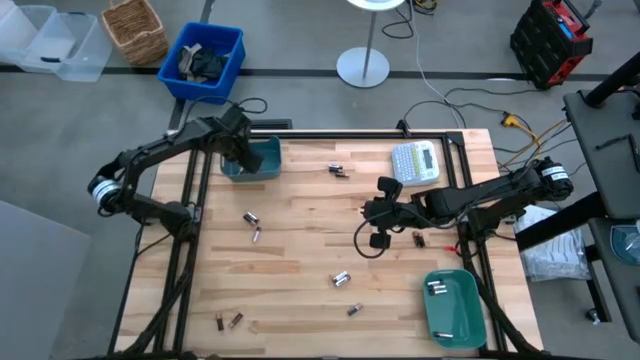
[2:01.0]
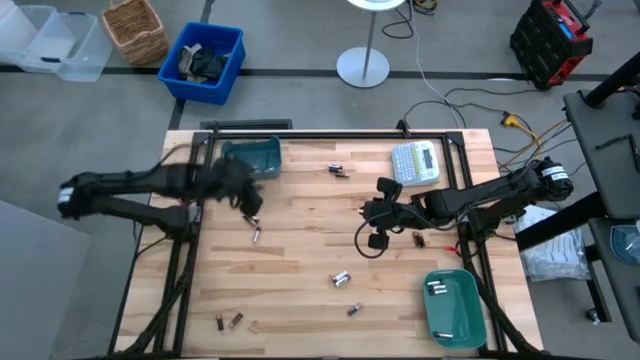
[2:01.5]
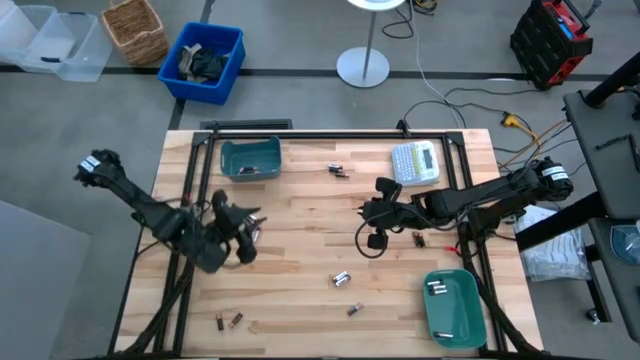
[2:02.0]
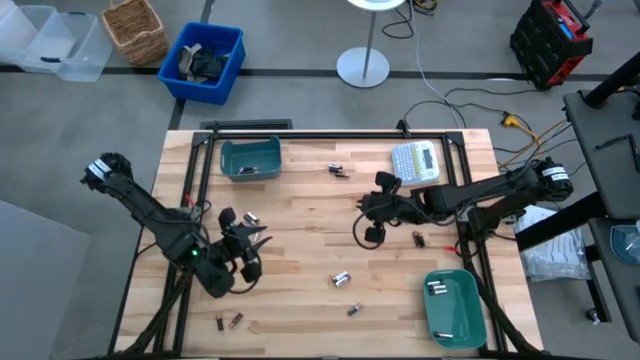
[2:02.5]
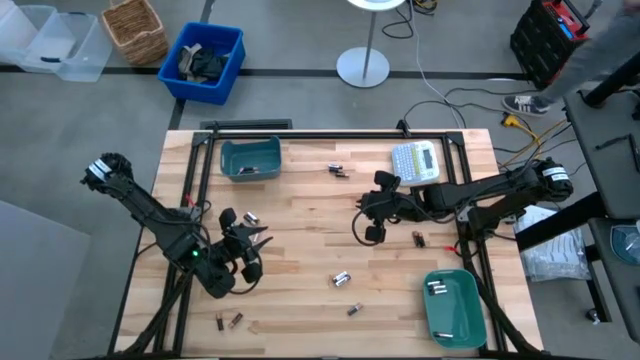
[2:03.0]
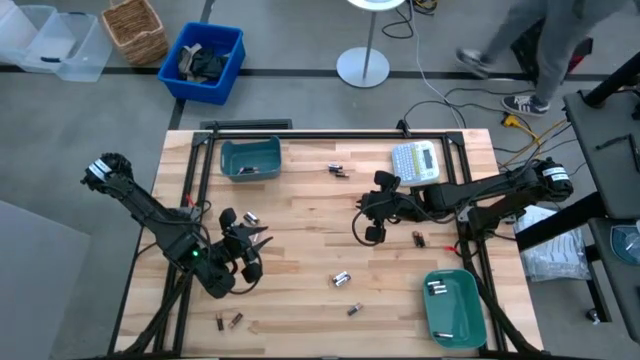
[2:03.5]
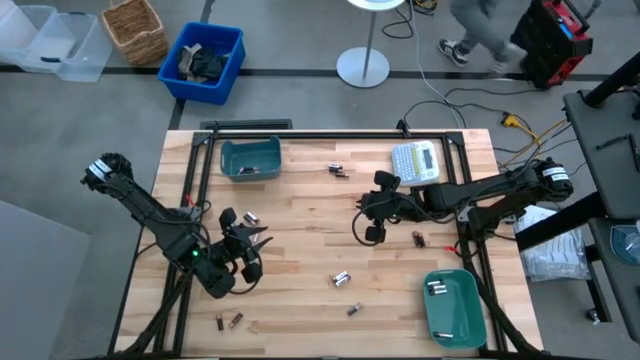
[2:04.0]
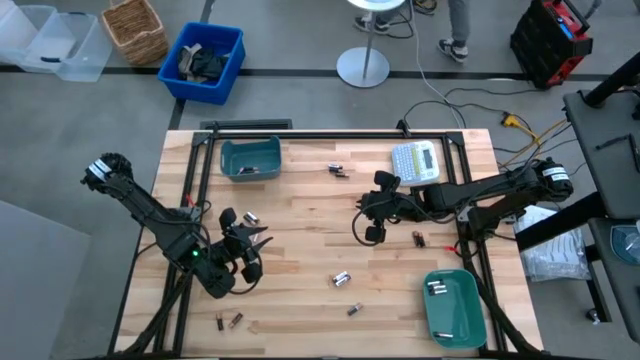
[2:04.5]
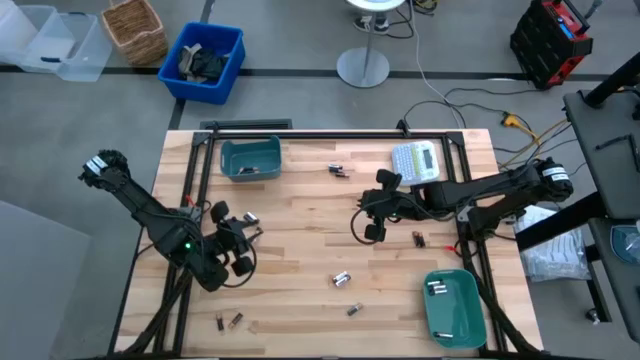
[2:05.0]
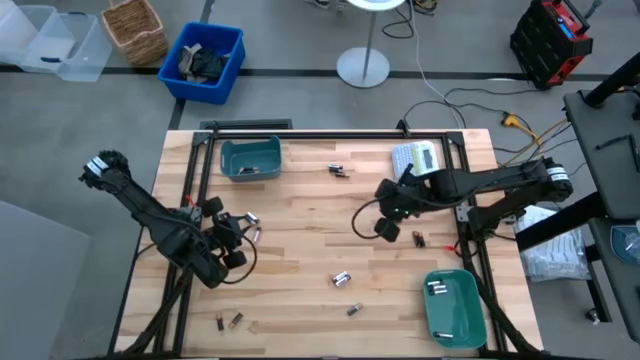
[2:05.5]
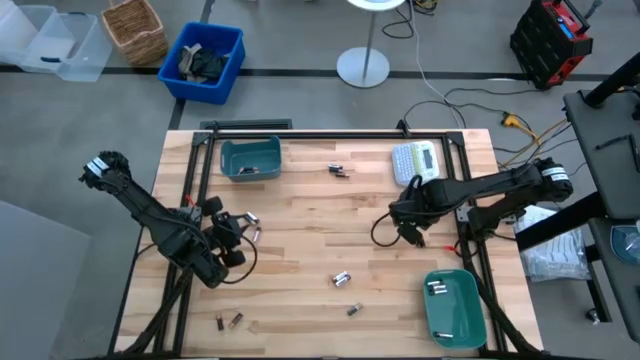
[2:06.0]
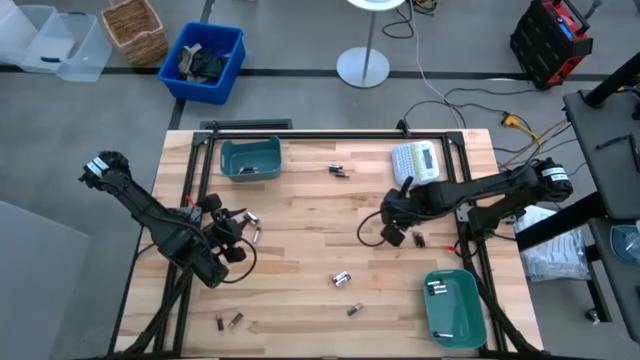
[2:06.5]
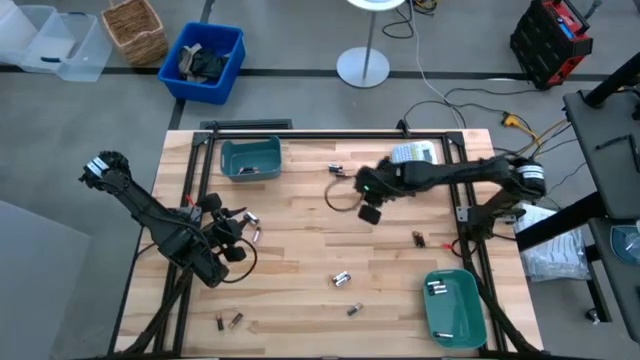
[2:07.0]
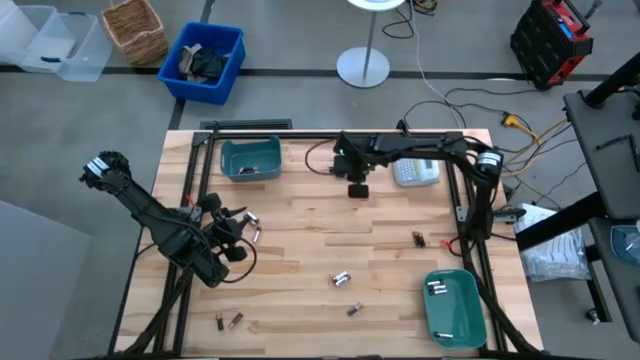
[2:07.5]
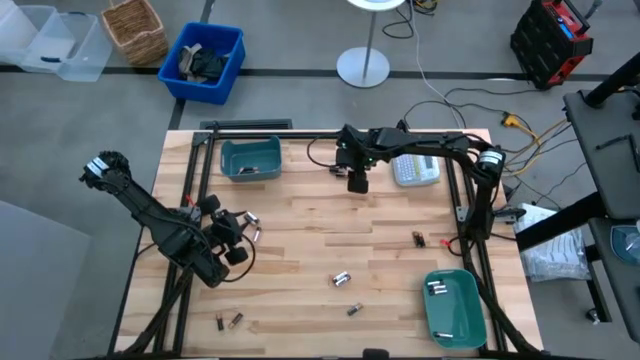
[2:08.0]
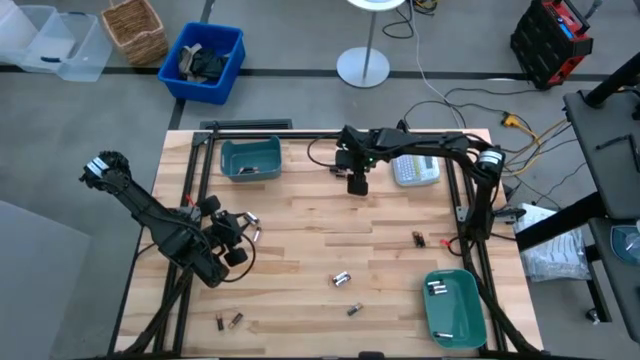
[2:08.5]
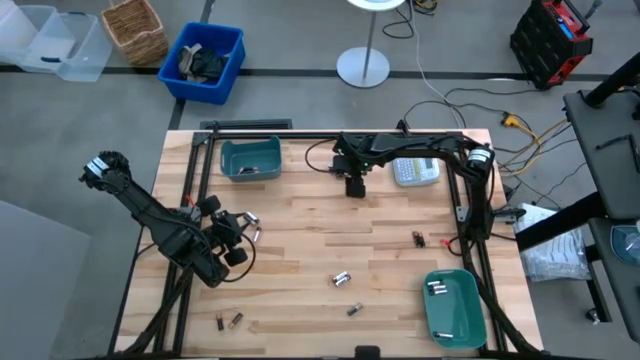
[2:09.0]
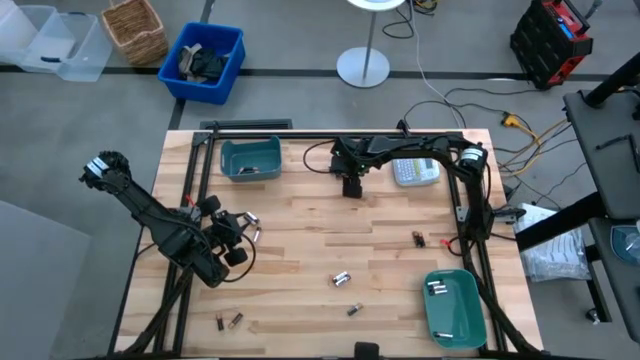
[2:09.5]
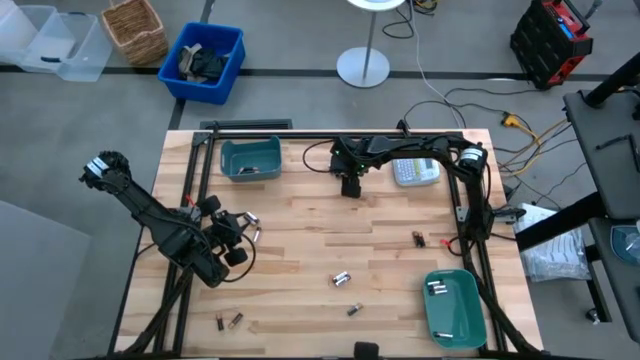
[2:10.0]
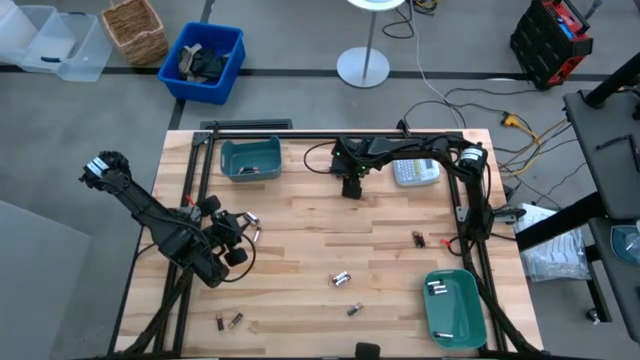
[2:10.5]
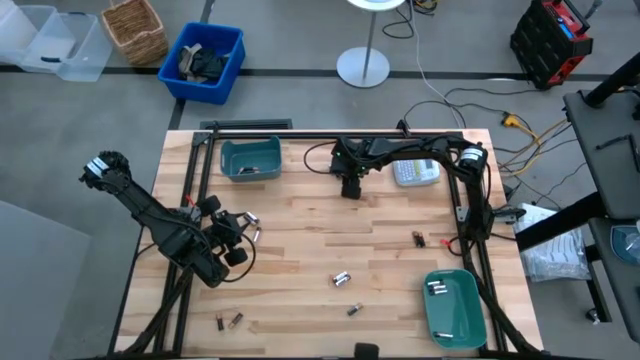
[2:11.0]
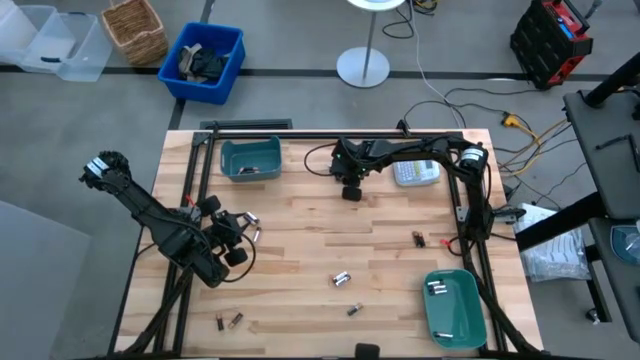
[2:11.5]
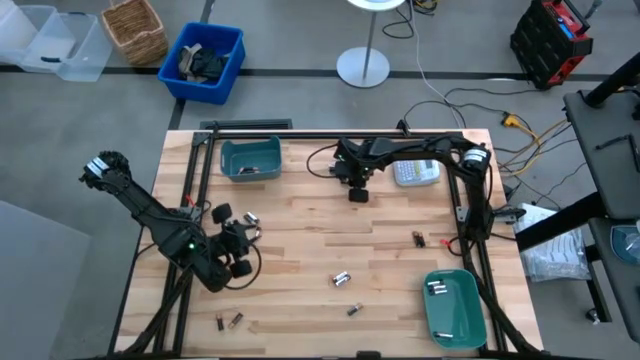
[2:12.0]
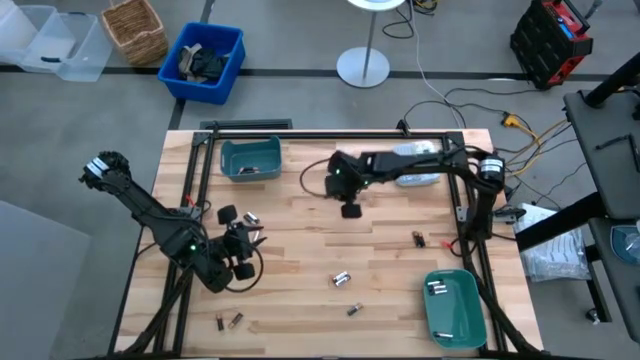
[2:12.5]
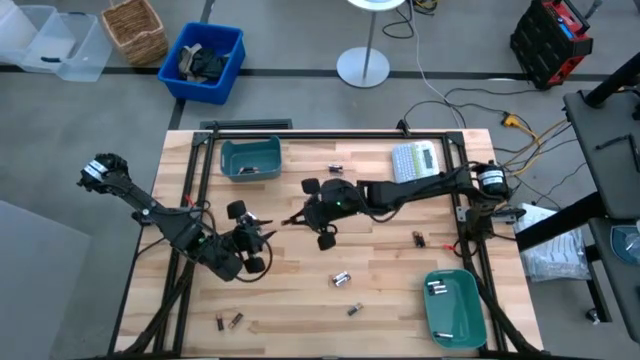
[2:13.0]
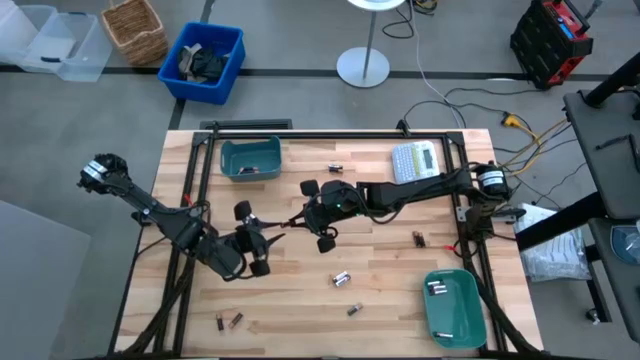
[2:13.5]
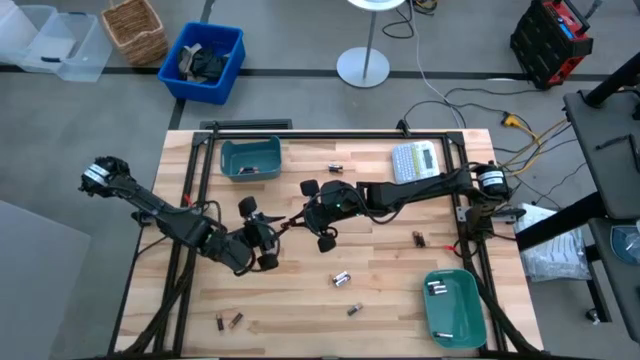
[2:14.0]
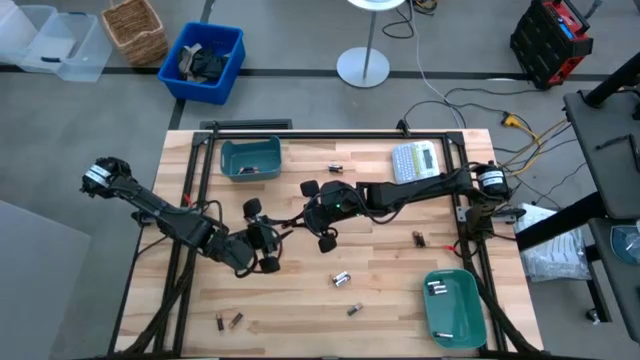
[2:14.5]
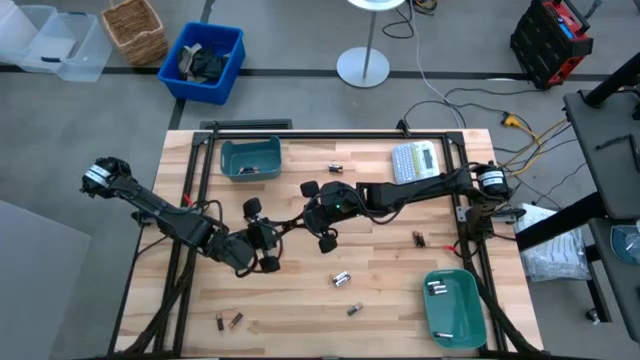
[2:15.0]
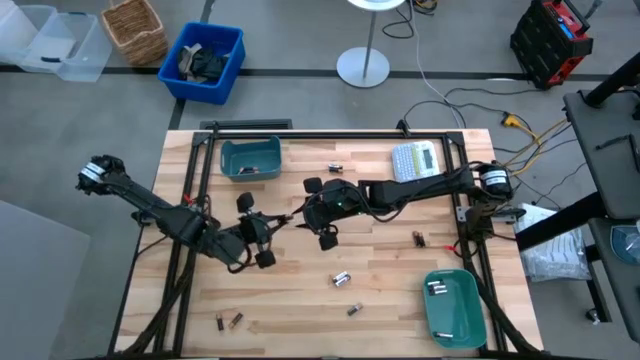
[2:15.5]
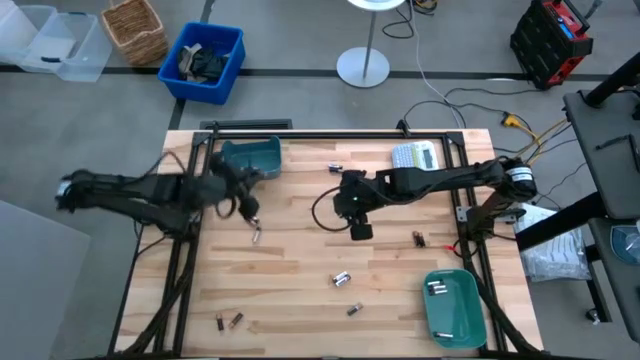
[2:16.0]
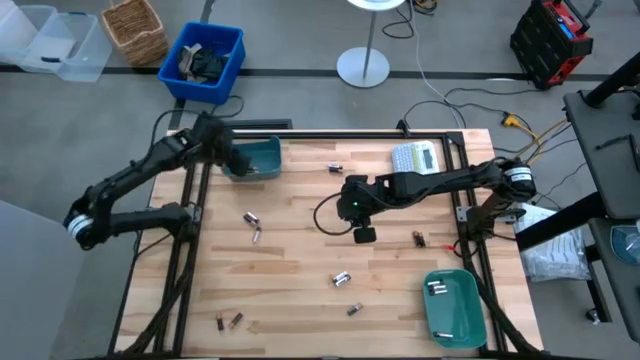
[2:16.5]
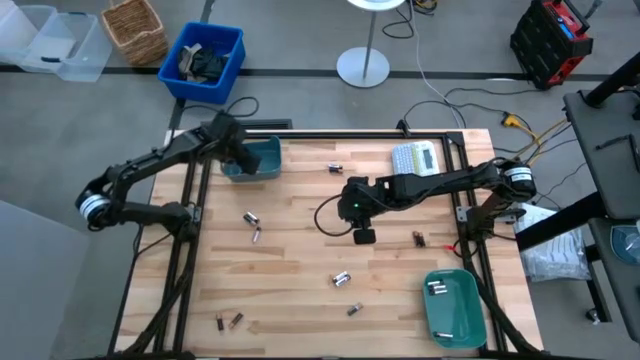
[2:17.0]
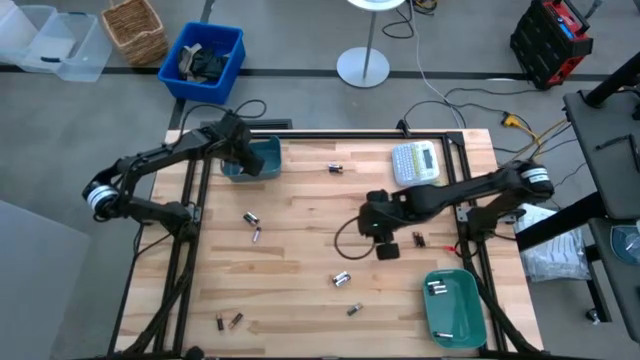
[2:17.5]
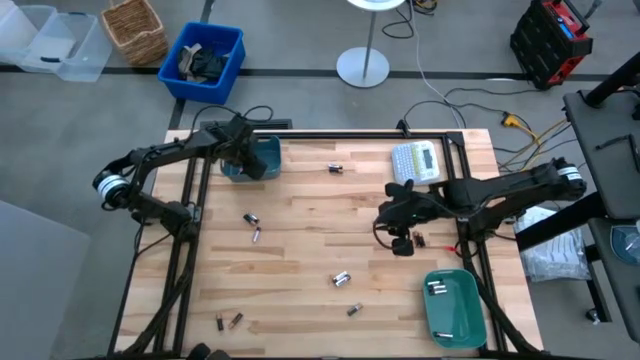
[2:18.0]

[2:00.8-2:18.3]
Task: Sort batteries
Put the black battery into the blue bin

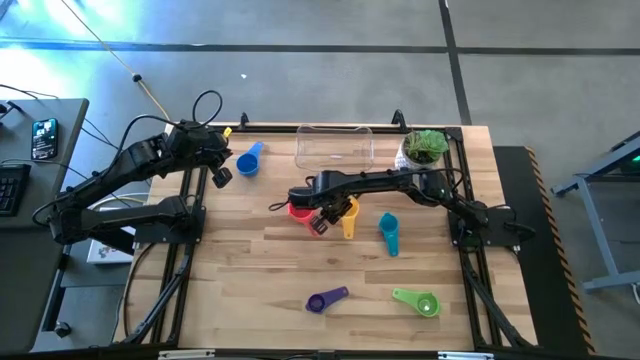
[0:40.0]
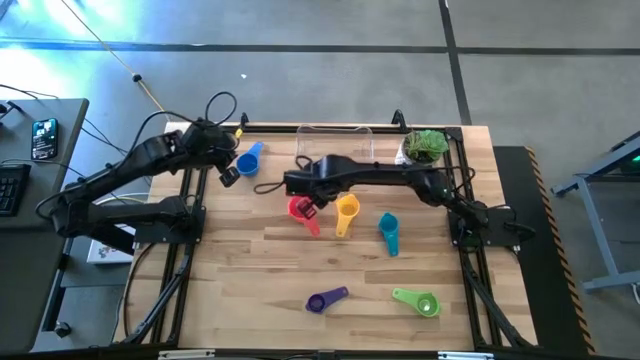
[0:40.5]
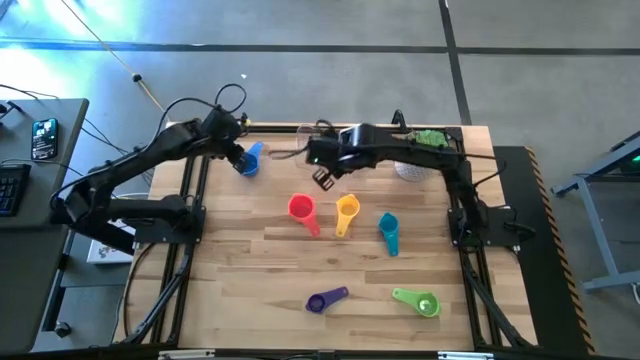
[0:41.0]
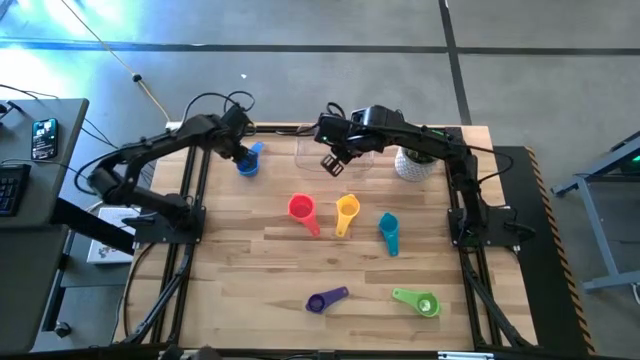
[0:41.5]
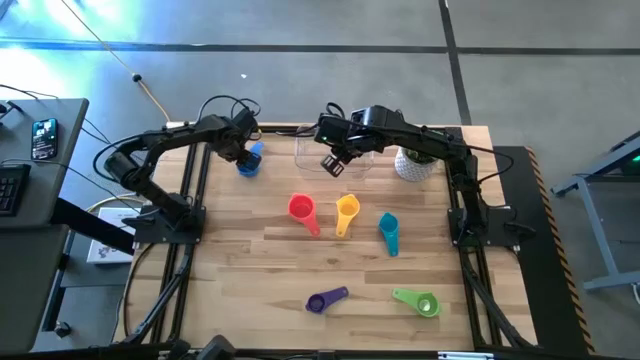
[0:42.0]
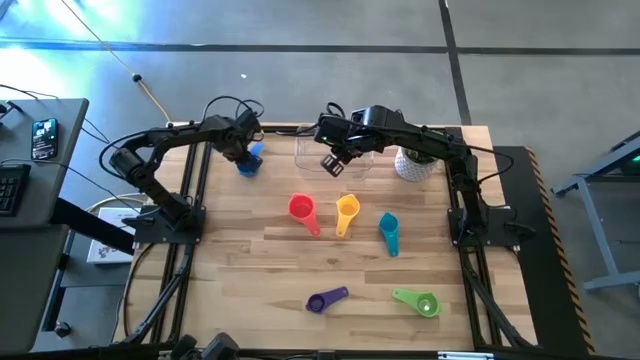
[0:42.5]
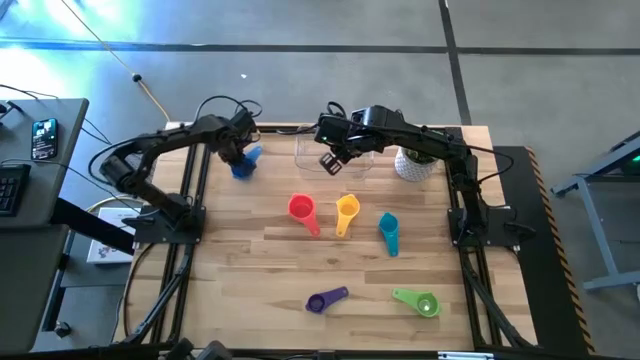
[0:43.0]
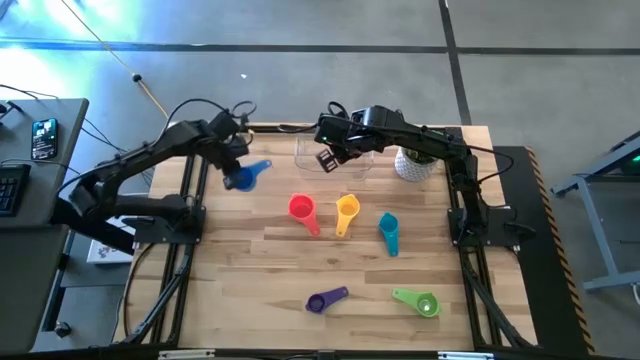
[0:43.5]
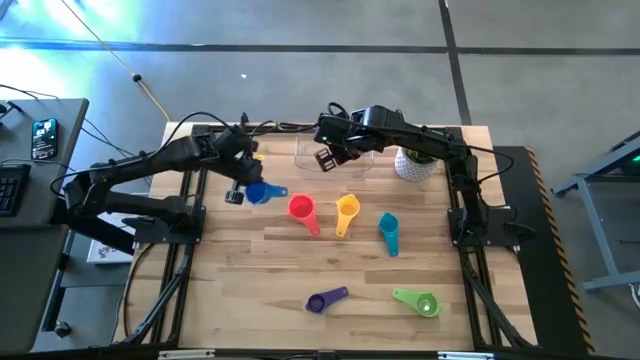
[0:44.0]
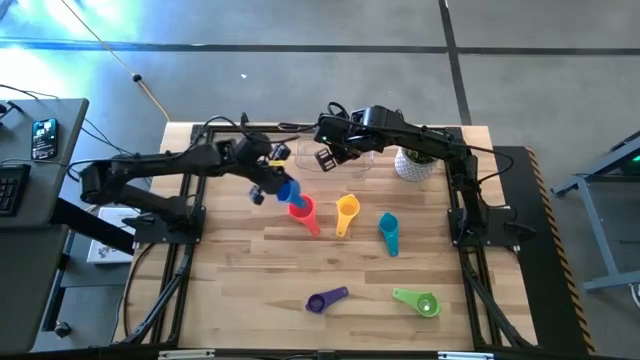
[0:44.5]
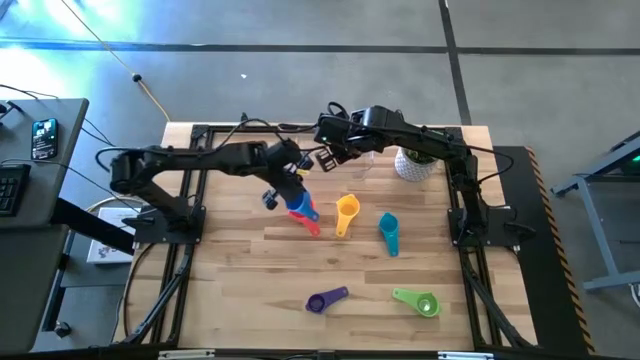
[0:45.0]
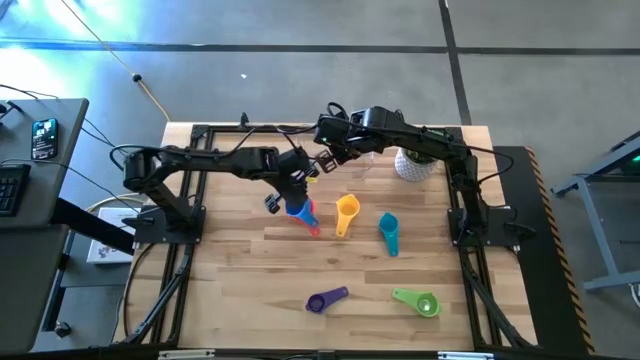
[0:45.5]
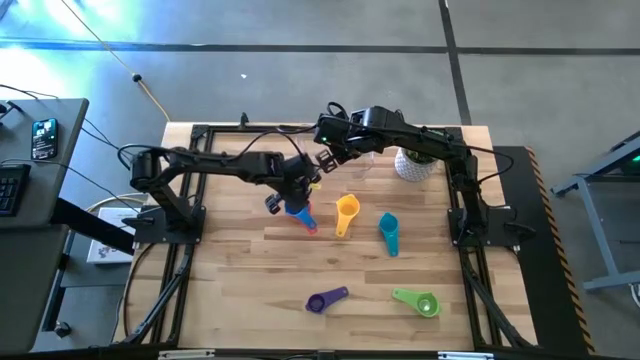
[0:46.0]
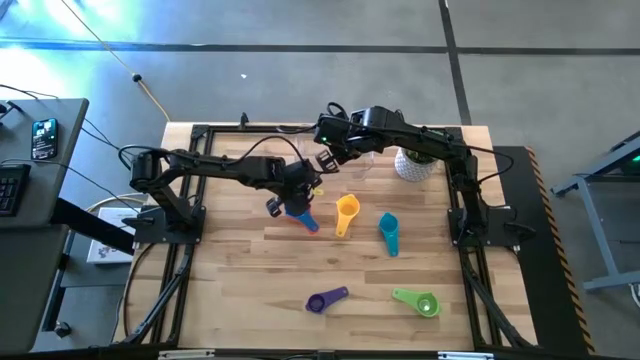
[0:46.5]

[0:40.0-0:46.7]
Task: Nest measuring cups in basket
Stack the blue measuring cup on the top of the red measuring cup
